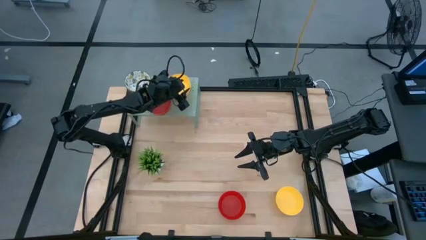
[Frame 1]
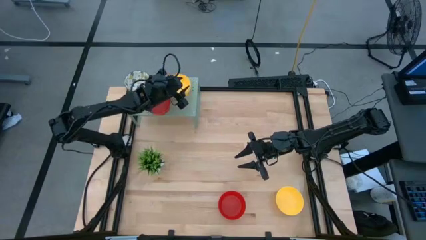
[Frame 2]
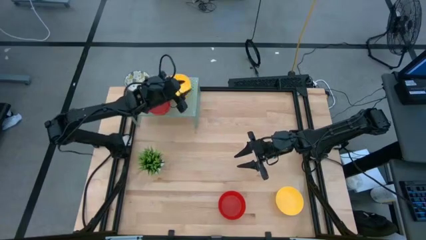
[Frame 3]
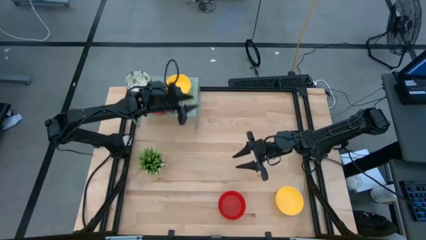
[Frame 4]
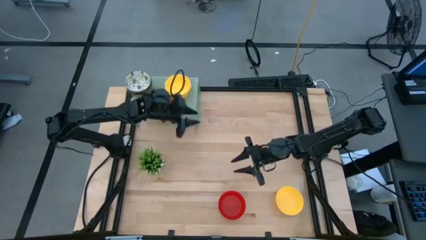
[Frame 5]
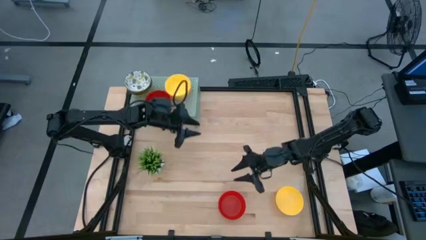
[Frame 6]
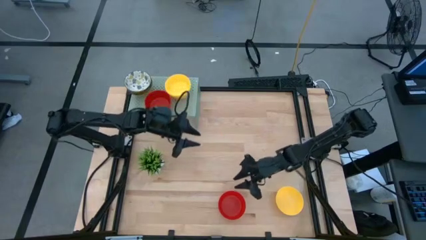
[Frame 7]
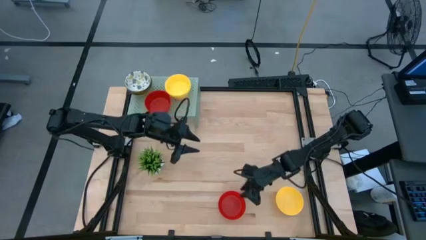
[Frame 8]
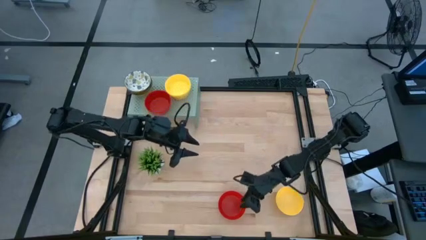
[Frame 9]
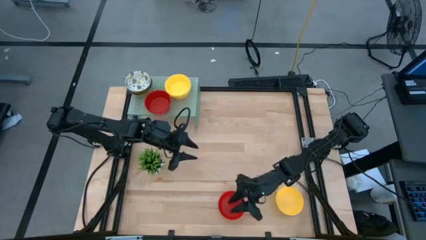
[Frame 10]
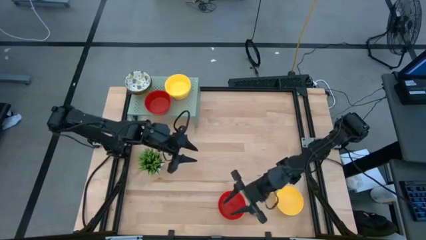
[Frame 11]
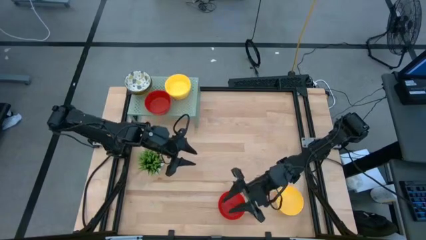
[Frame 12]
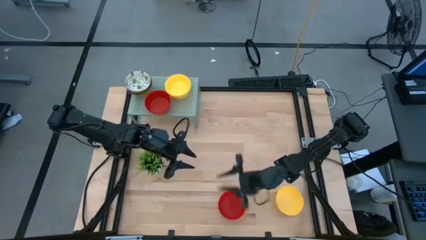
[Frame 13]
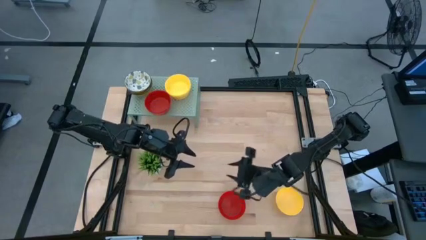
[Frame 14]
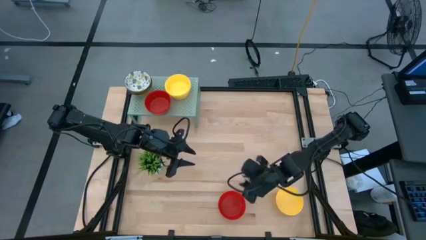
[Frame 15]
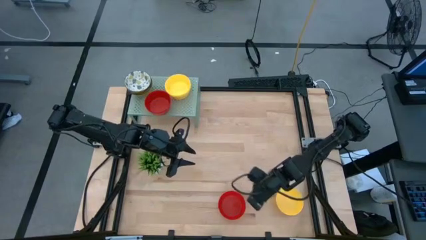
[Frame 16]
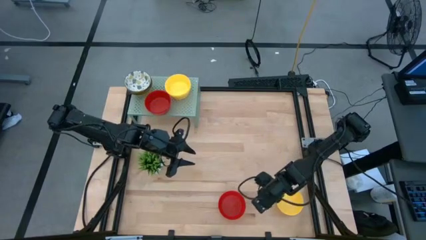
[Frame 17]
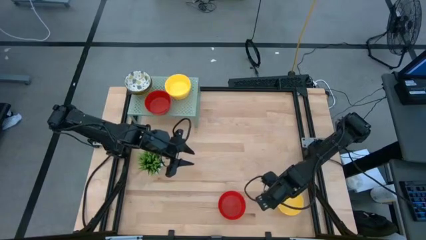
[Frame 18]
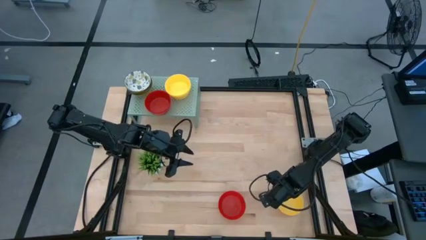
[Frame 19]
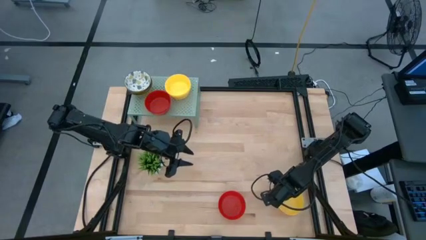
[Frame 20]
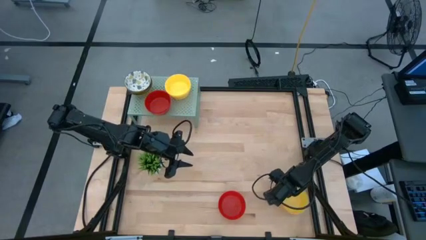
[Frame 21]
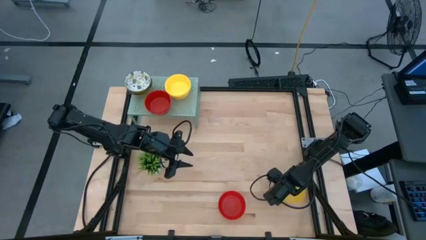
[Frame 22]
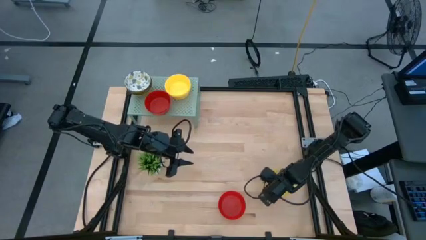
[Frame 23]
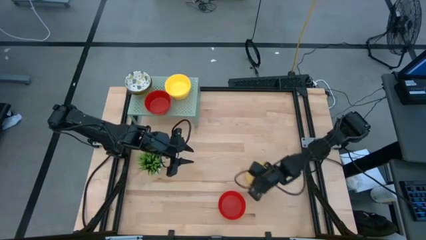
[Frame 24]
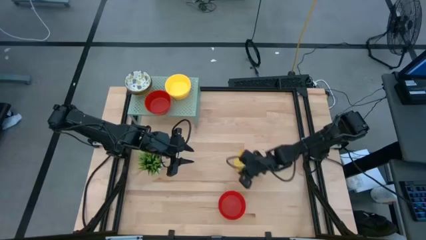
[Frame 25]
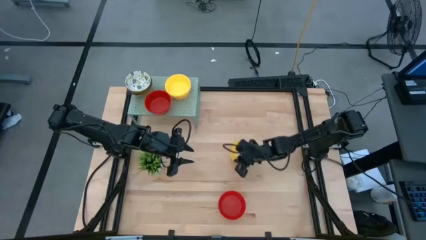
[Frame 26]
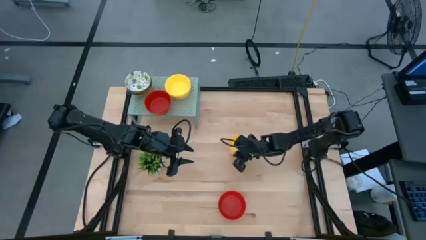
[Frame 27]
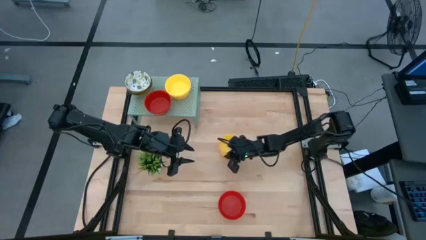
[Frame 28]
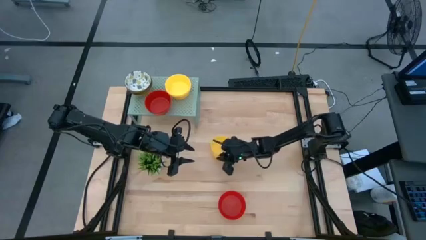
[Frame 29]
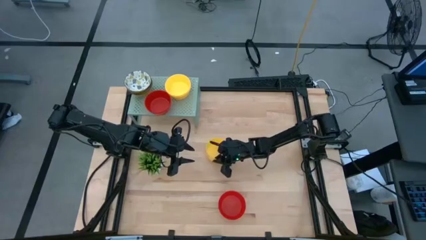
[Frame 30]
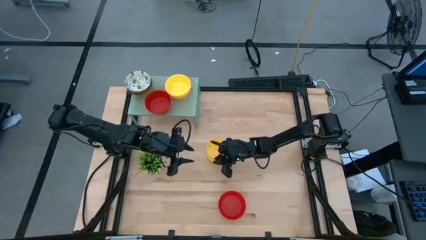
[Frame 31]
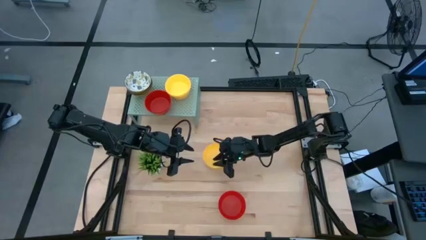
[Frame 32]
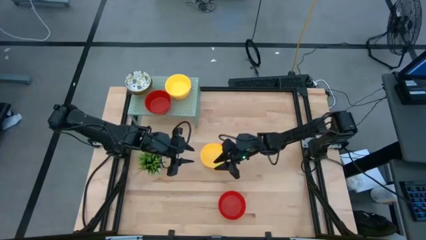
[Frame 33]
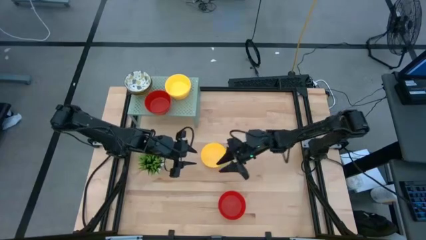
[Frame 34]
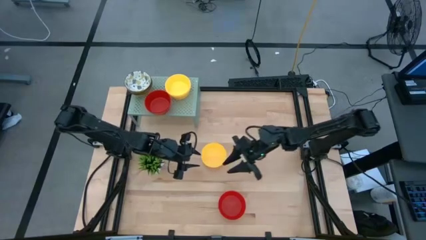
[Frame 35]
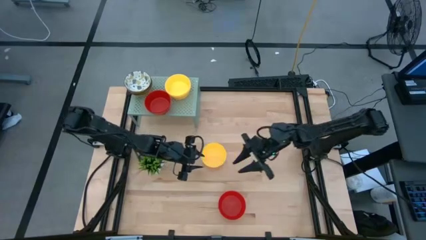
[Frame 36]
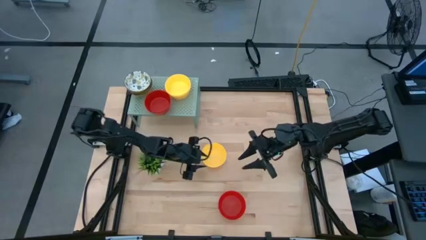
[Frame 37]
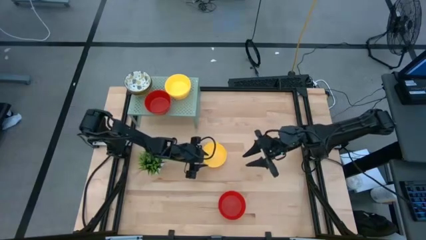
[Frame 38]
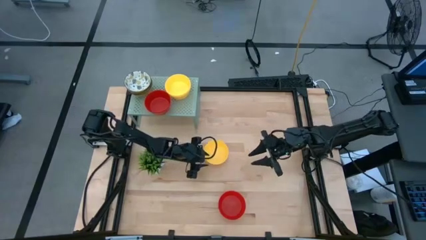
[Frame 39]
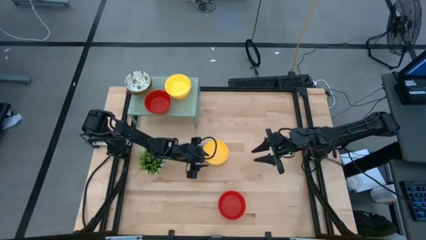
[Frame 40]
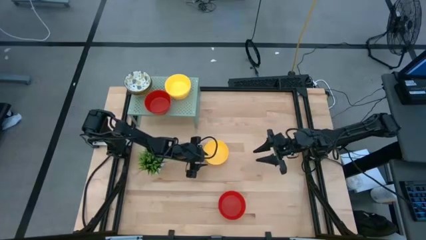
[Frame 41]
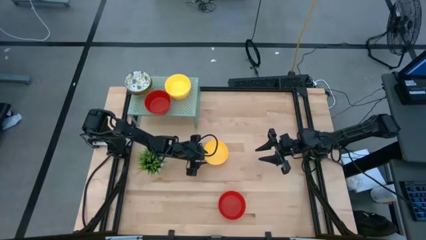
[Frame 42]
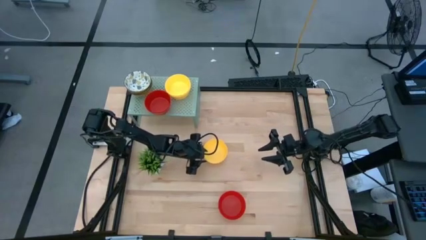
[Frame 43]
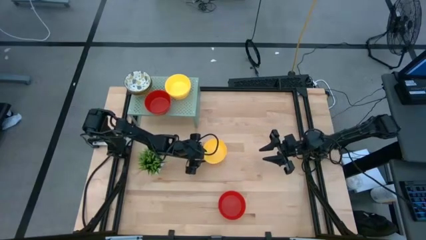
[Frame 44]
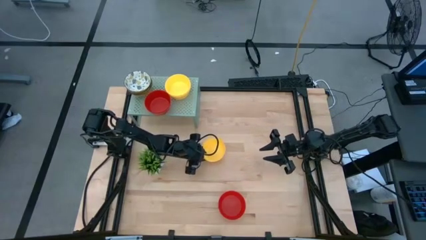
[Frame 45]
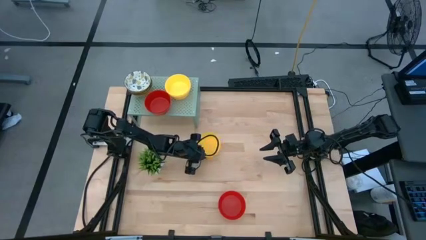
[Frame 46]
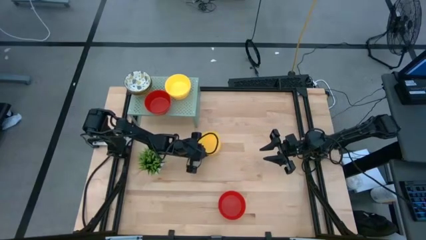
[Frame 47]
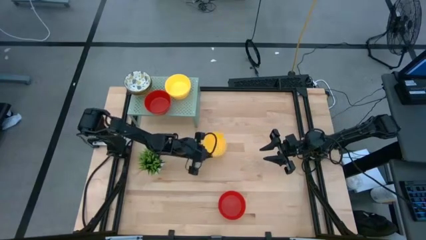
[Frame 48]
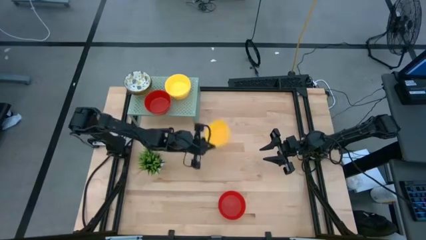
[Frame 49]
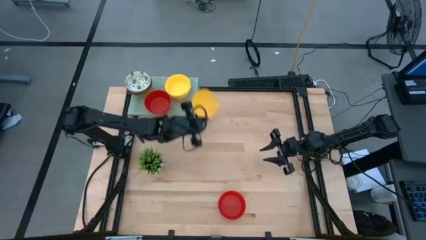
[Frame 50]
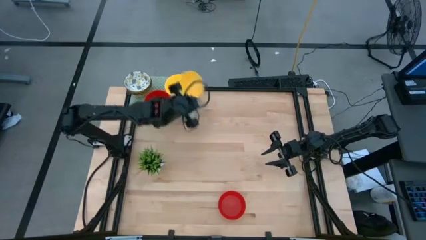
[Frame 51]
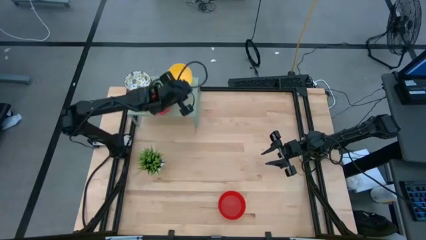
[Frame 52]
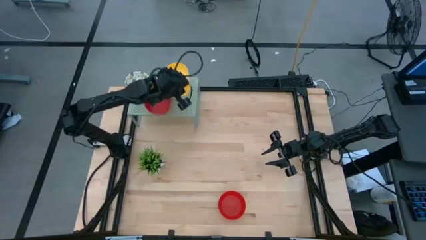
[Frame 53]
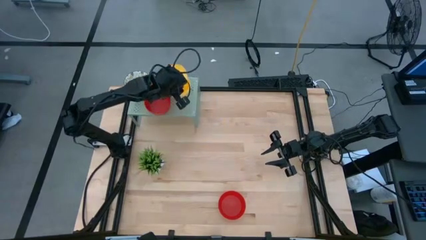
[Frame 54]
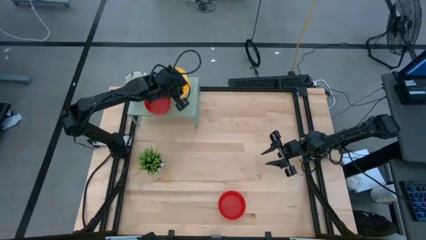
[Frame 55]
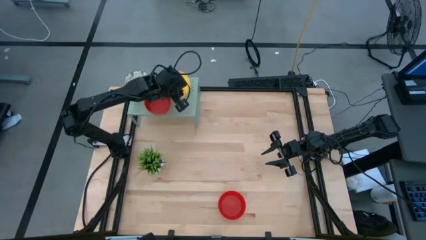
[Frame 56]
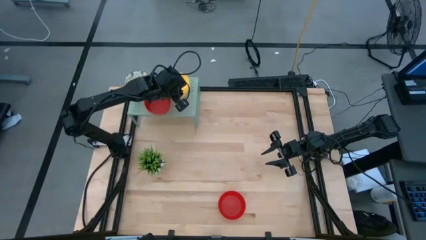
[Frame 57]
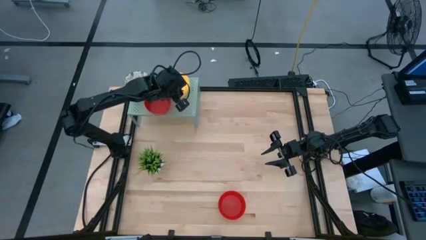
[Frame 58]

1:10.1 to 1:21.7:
Task: Pick & Place Mini bowls
Stack the yellow bowl on the yellow bowls on the shelf

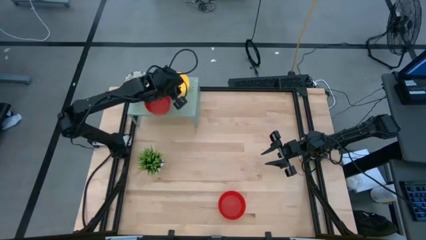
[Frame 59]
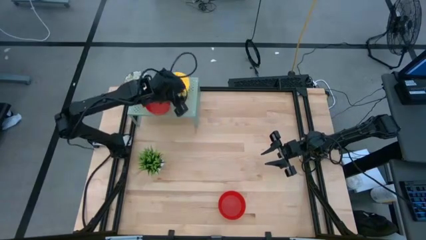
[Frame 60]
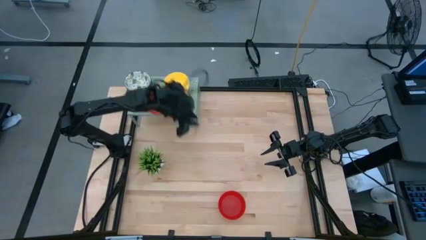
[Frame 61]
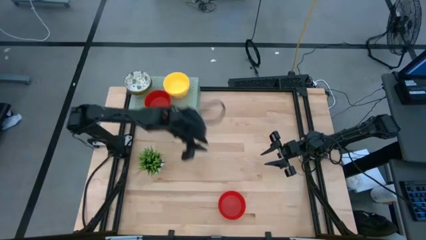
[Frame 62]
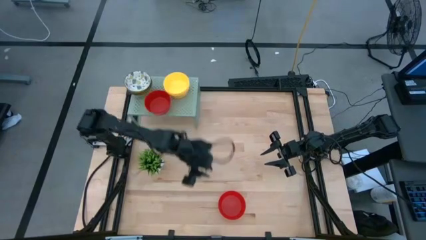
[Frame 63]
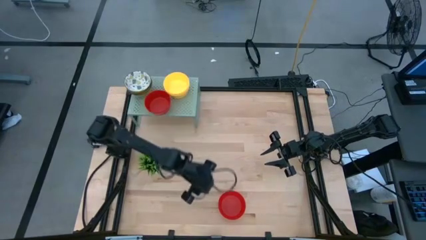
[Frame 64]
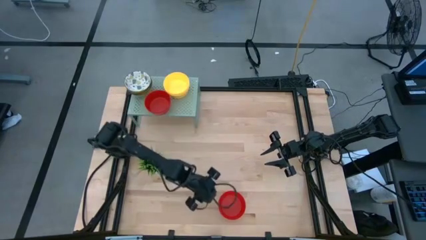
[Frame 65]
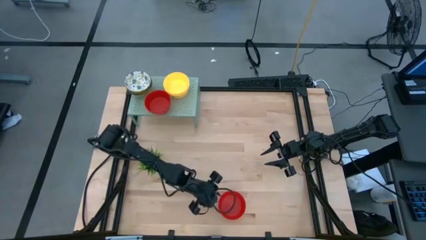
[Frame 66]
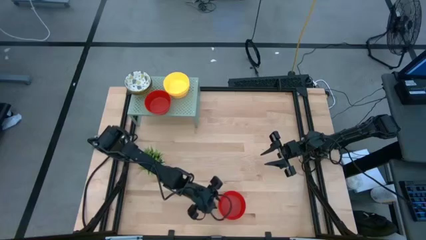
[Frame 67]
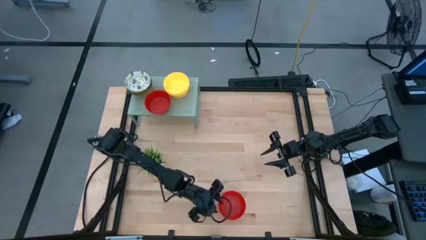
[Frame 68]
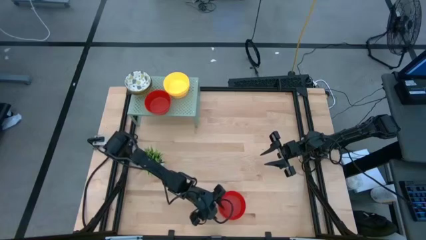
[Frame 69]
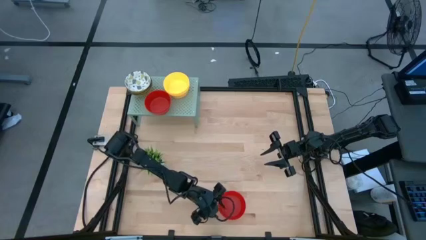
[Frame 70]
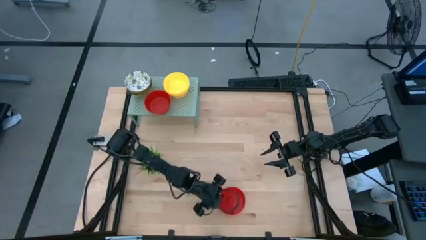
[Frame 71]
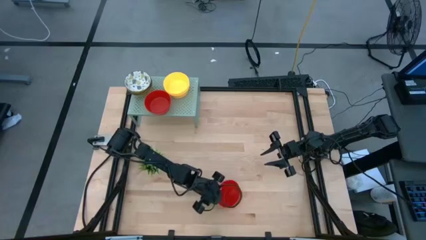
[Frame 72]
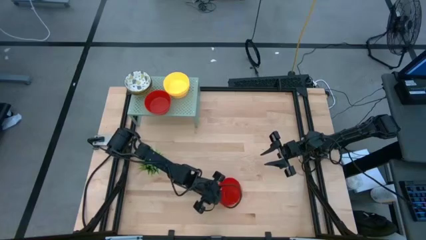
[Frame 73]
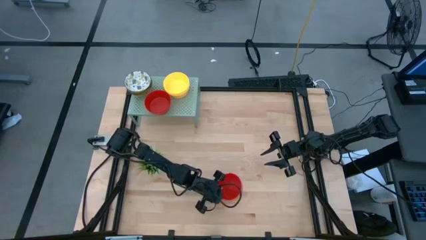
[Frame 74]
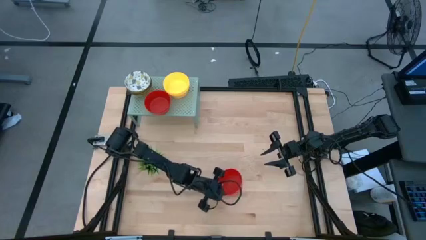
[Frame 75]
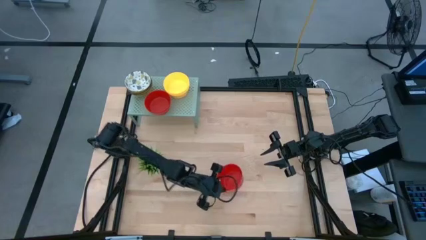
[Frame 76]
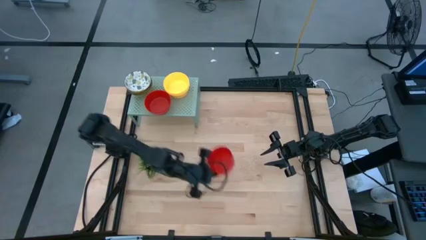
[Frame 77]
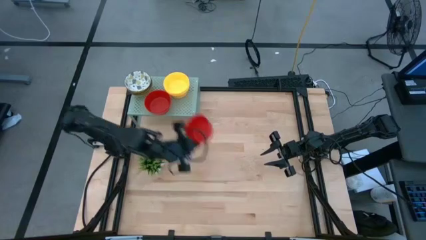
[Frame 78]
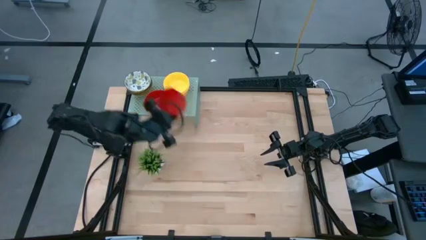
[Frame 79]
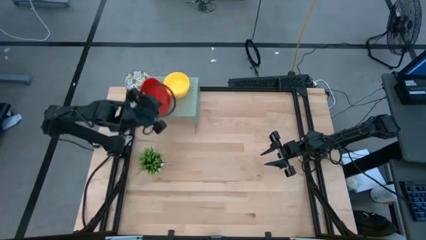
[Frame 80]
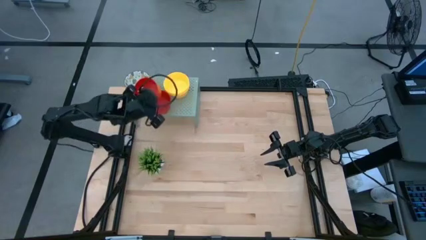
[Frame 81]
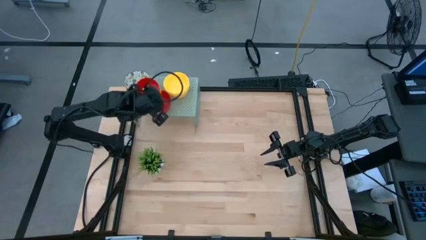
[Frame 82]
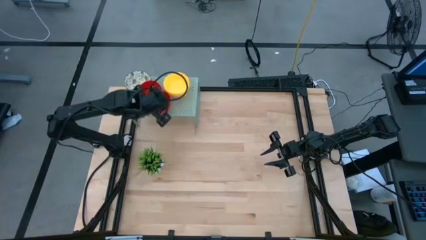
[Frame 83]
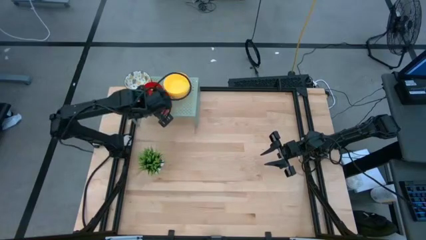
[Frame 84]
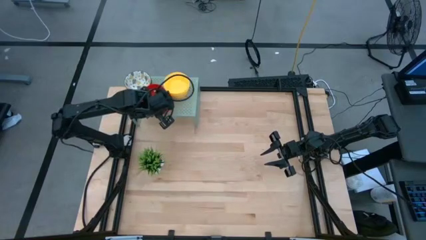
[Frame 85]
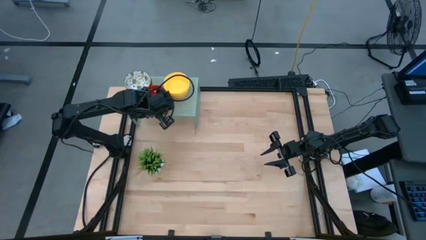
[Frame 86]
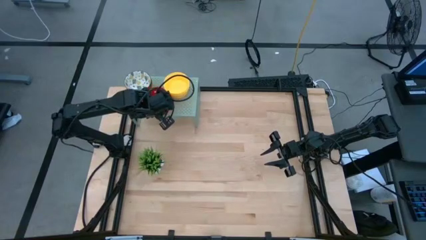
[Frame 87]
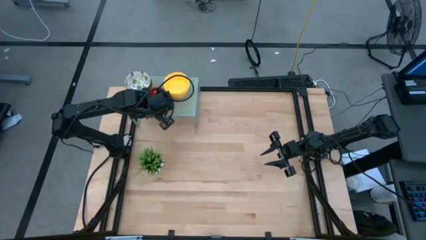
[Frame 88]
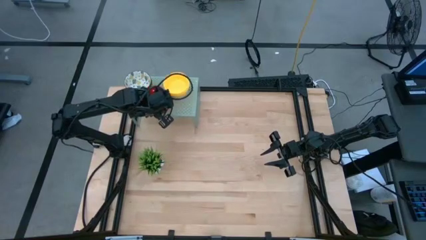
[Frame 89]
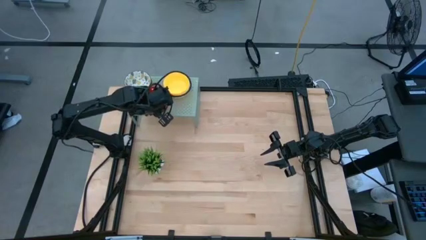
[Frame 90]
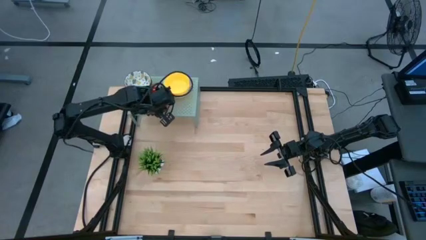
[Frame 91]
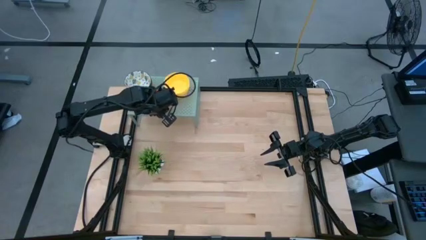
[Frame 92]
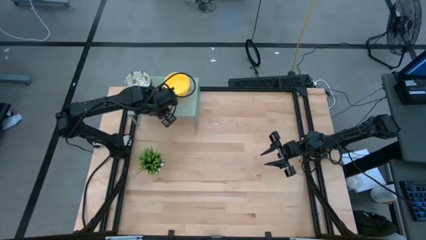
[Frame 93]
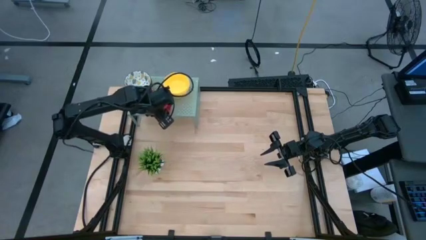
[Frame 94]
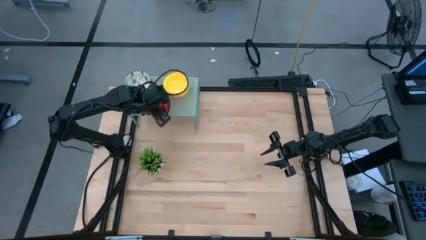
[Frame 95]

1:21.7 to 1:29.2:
Stack the red bowl on the red bowl on the shelf
